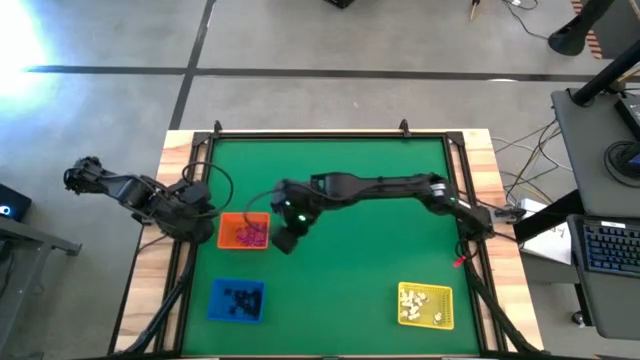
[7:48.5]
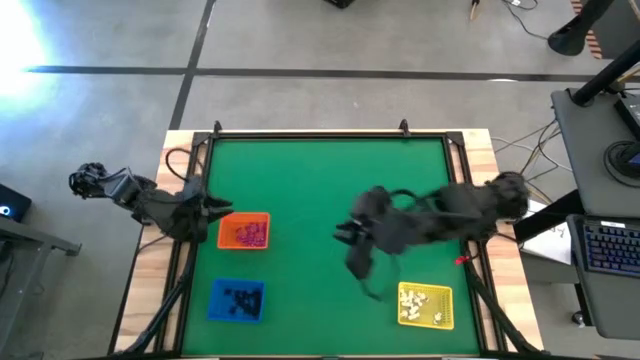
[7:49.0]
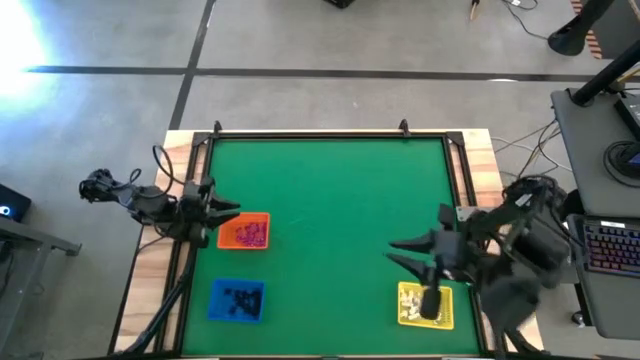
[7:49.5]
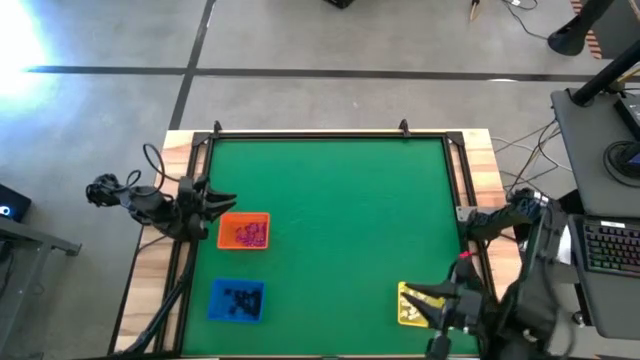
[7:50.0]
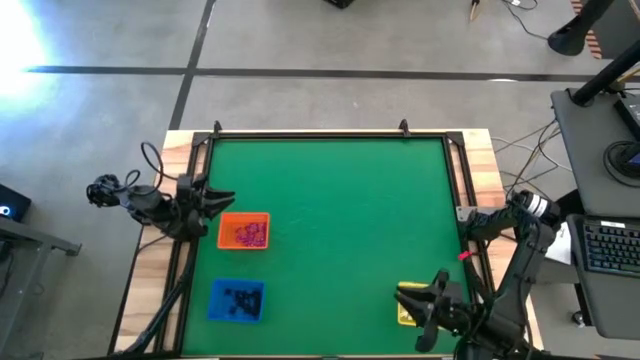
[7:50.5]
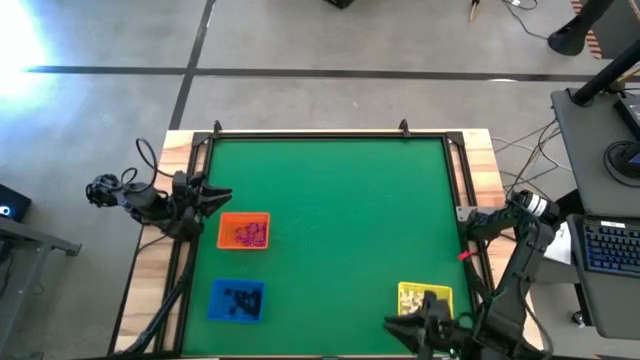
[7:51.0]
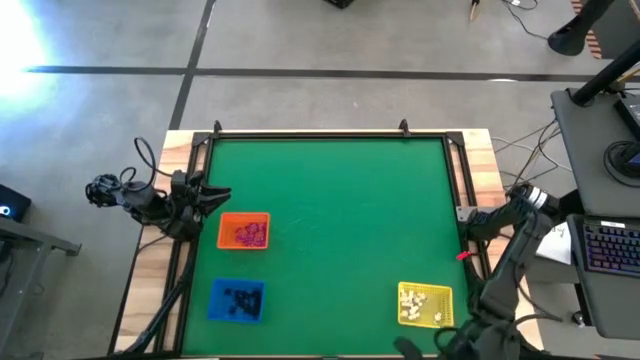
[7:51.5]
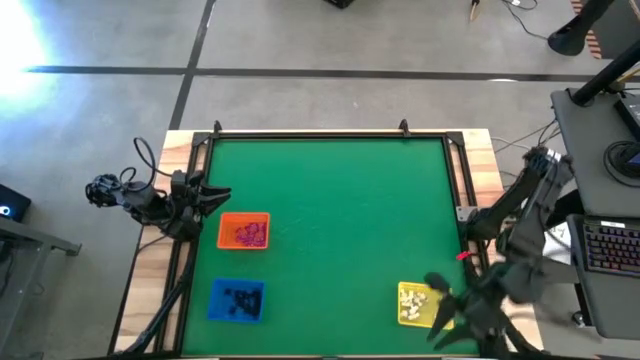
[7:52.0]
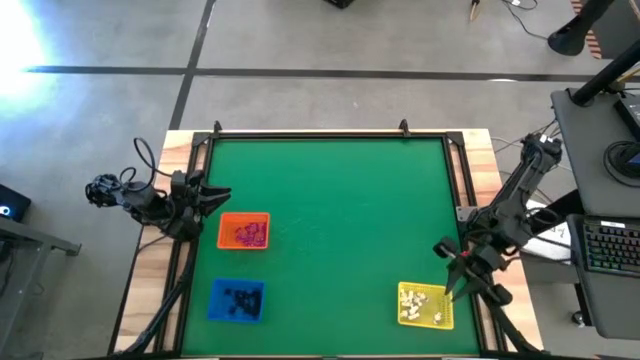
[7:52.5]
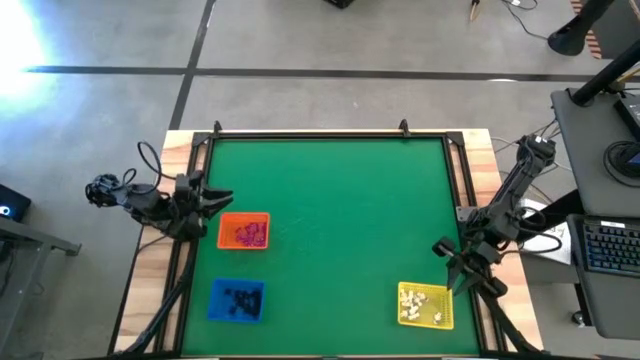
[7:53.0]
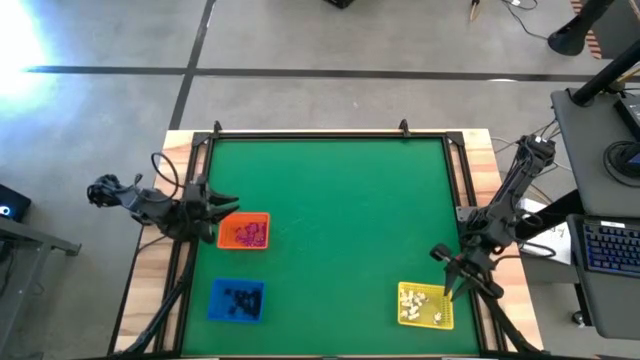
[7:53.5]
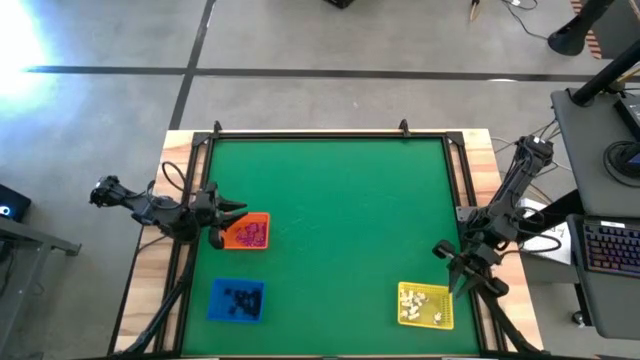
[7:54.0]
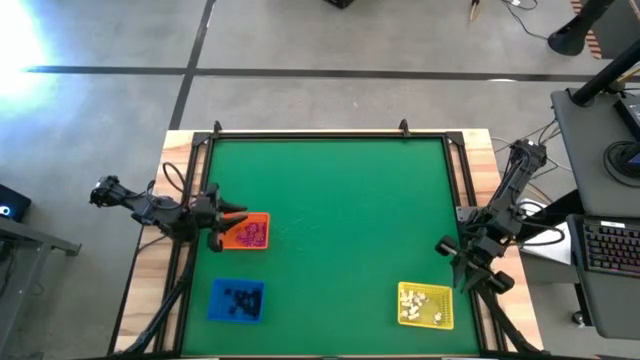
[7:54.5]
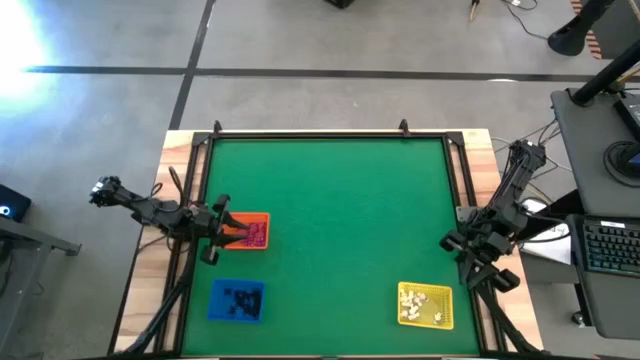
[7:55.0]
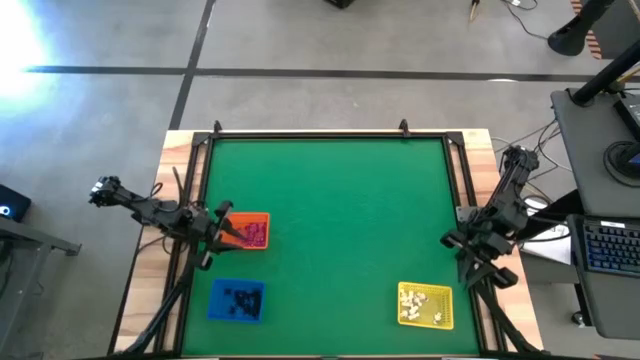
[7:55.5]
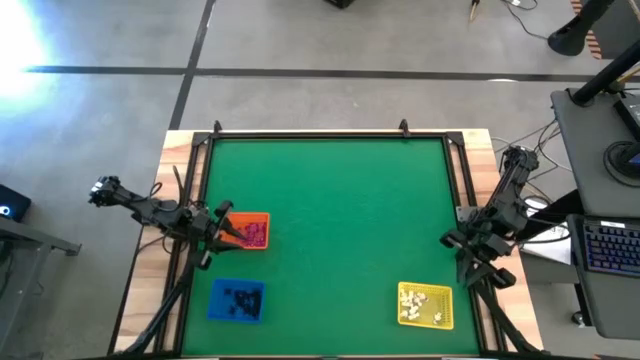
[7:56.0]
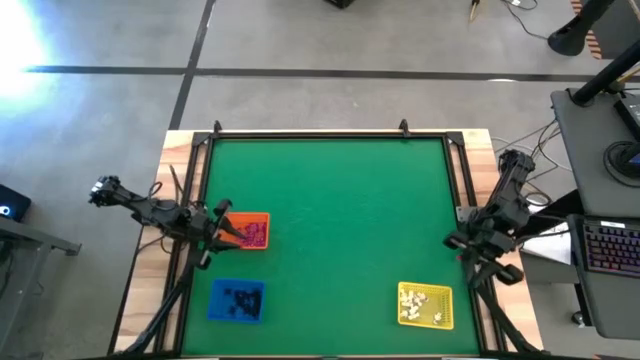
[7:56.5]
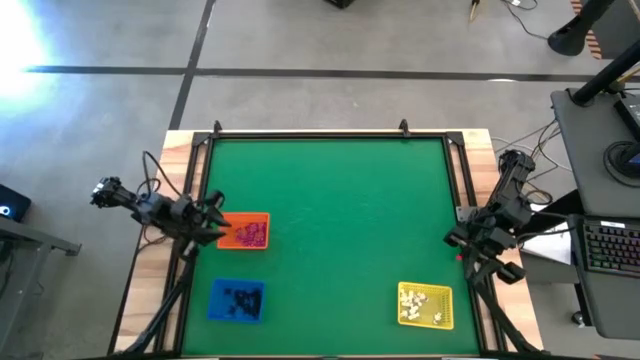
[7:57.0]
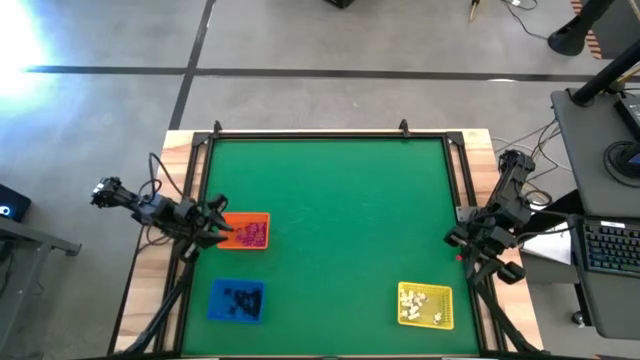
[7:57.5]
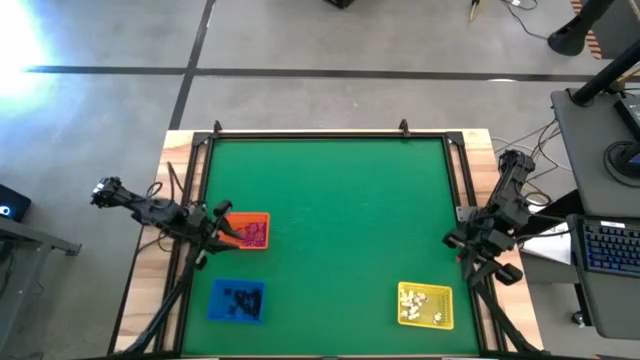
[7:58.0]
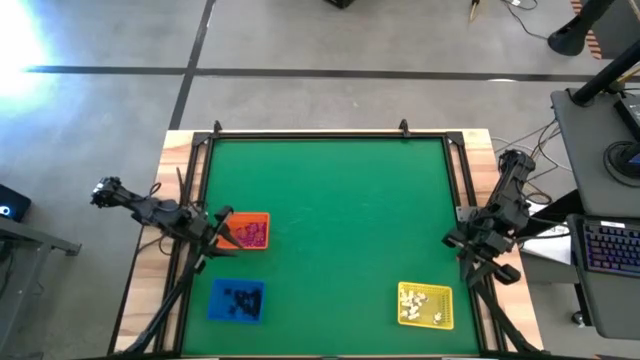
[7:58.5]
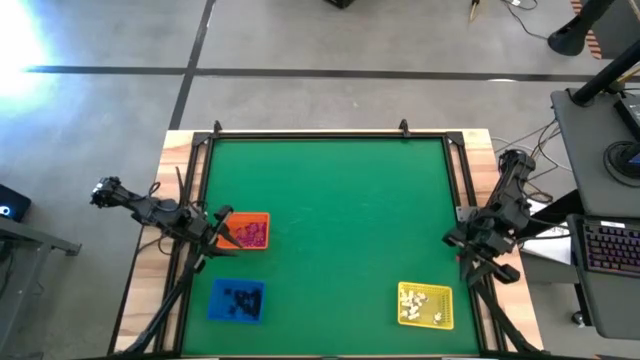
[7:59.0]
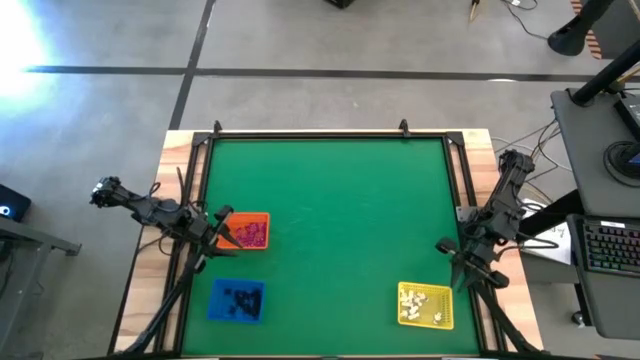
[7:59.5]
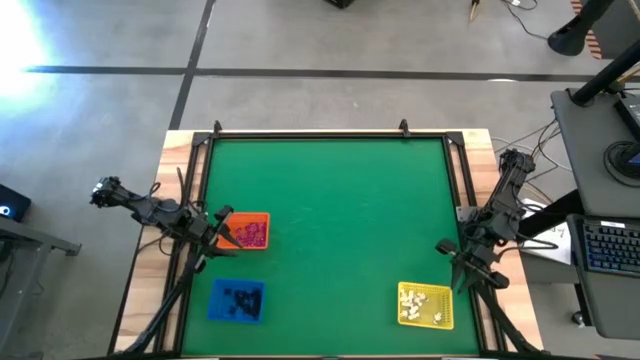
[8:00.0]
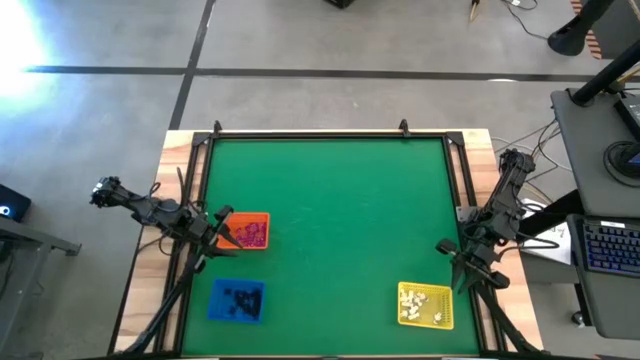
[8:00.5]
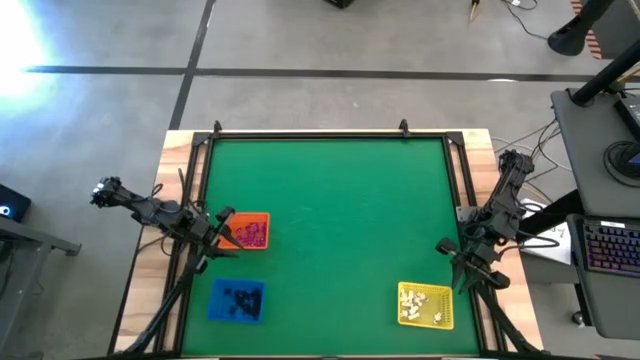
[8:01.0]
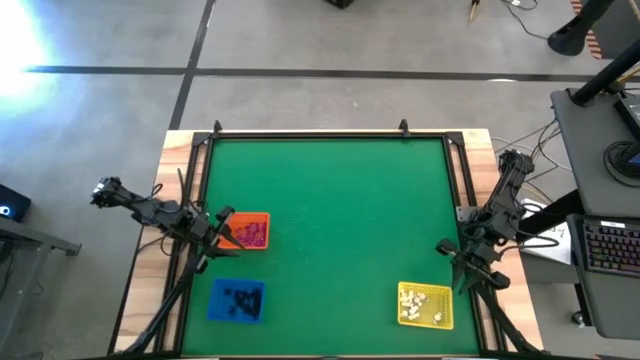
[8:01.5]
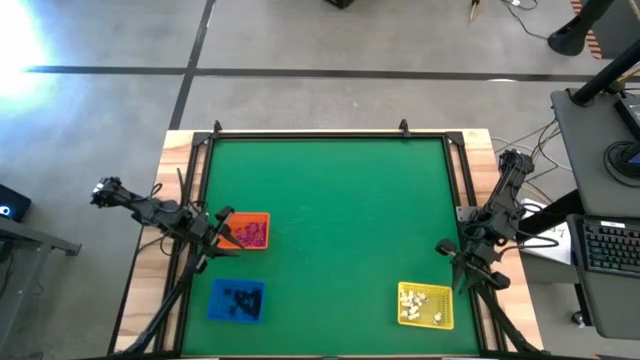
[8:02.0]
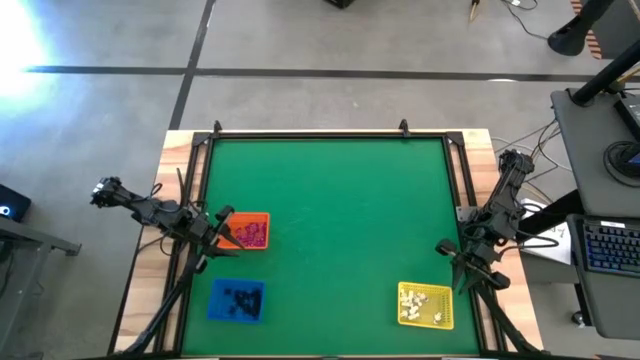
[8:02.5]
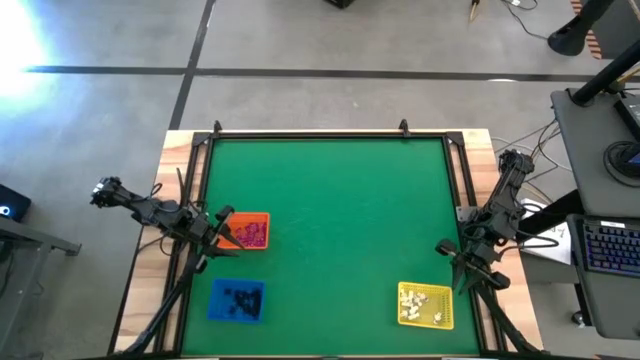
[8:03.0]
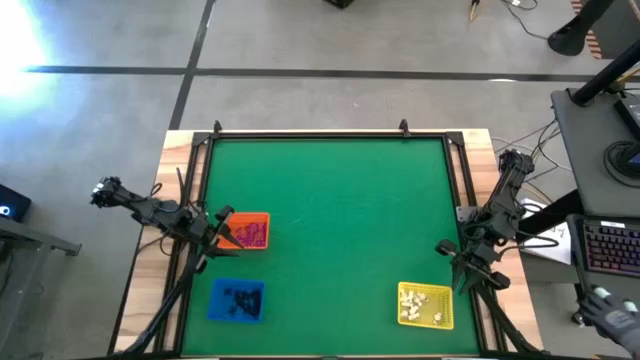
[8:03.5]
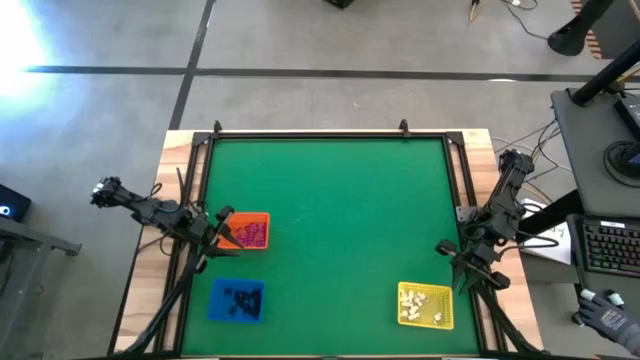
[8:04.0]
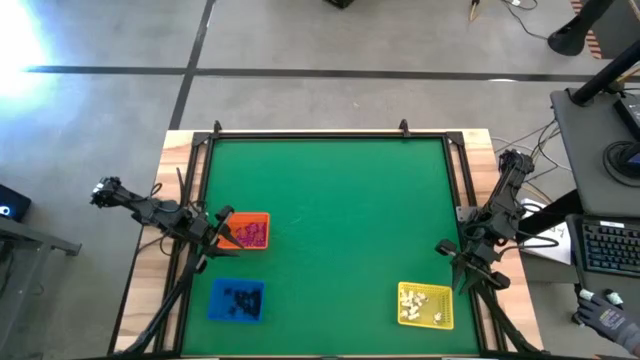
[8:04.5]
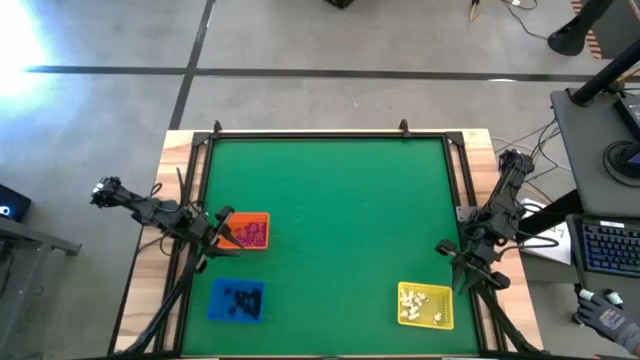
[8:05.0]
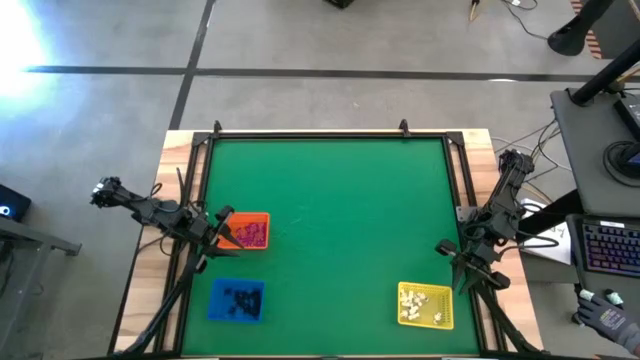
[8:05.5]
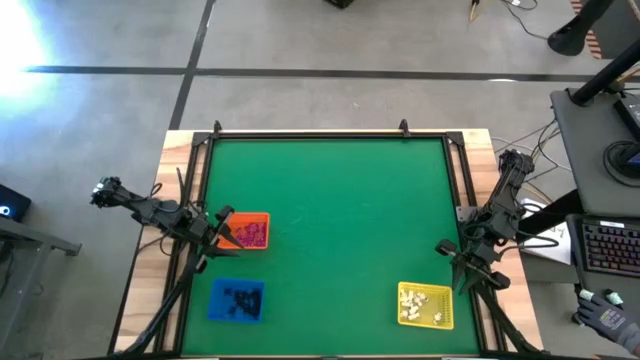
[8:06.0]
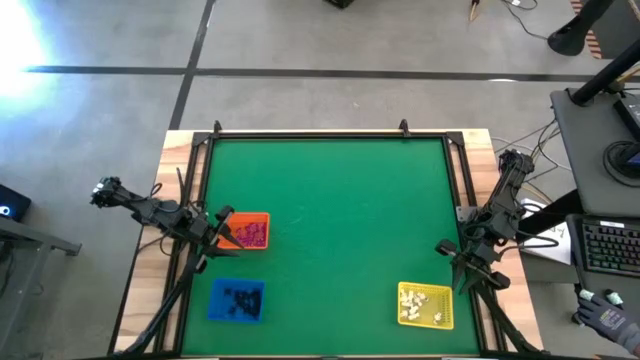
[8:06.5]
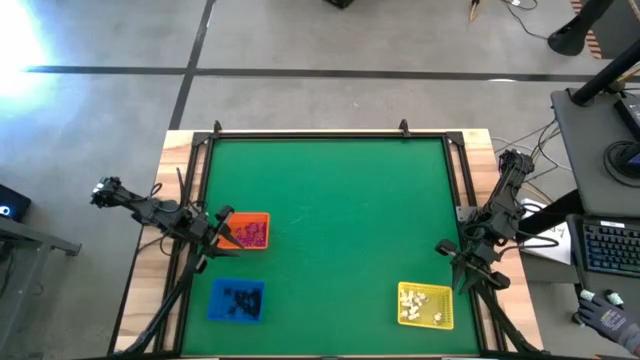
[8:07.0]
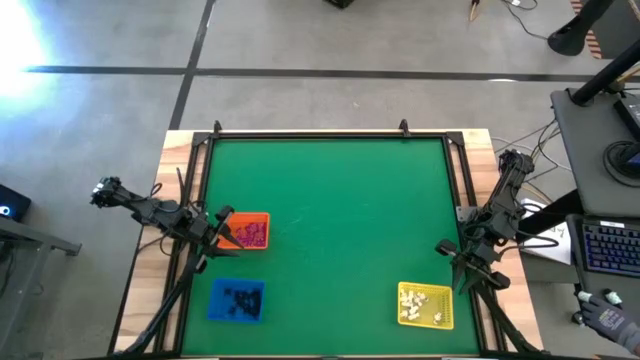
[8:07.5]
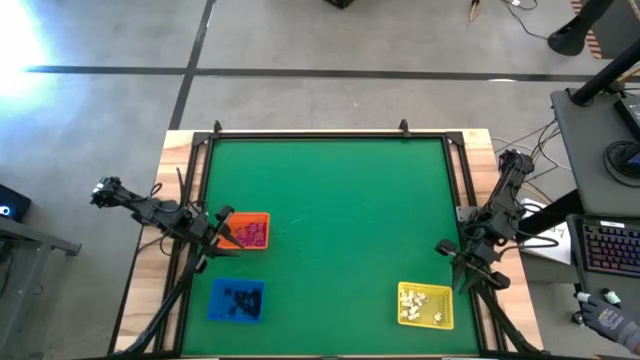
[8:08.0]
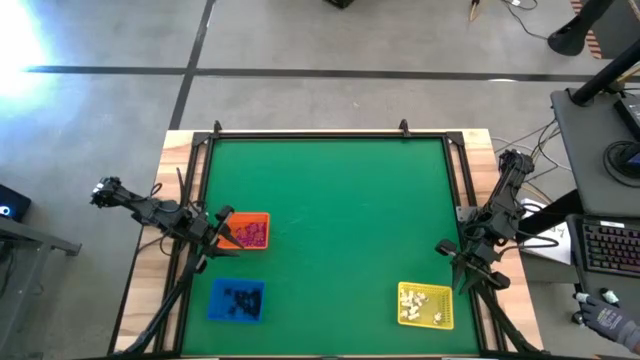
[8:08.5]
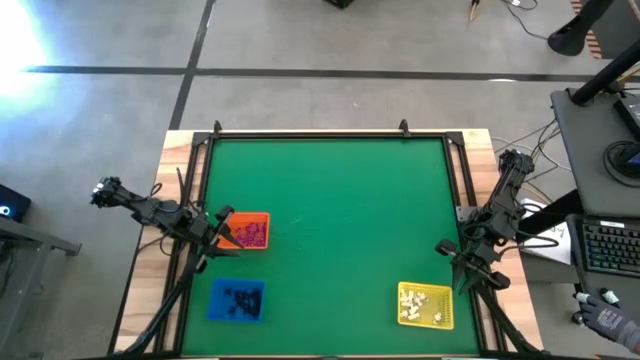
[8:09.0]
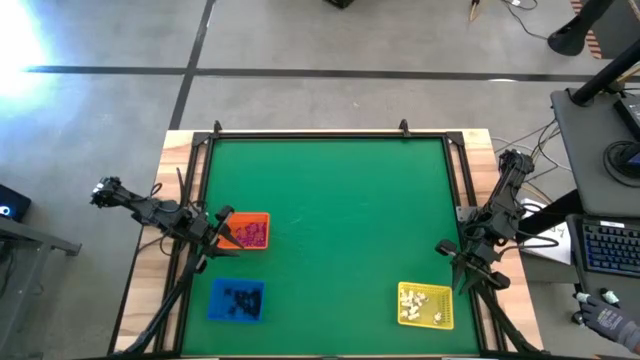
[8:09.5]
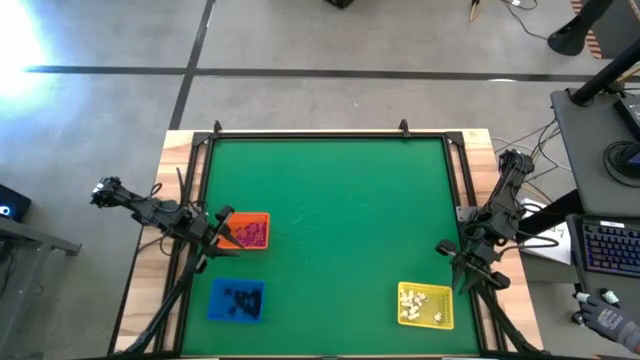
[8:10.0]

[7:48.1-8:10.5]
Task: Sort Halloween decoration
Return to Home Position
